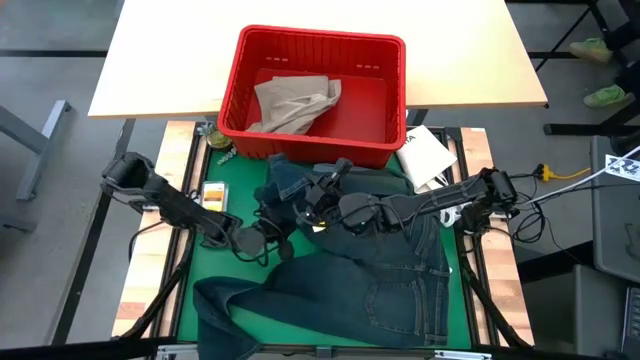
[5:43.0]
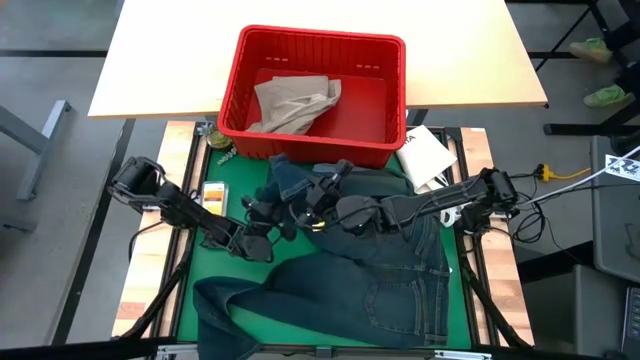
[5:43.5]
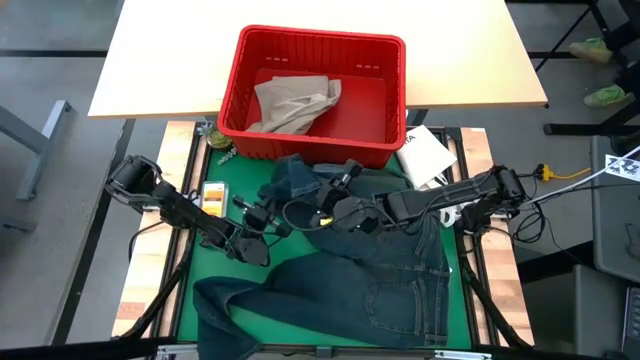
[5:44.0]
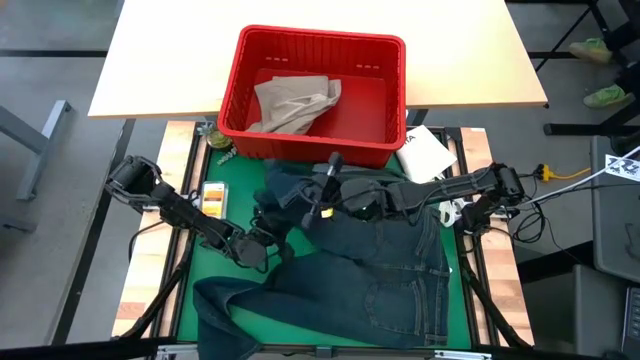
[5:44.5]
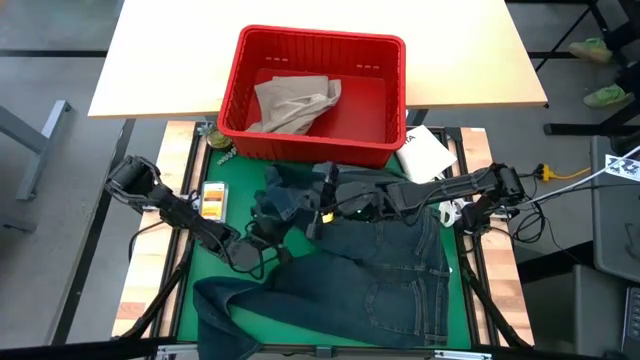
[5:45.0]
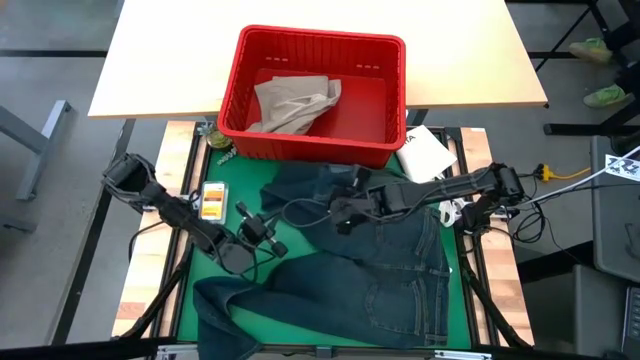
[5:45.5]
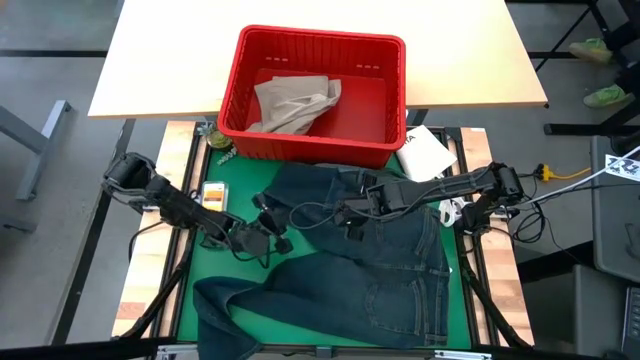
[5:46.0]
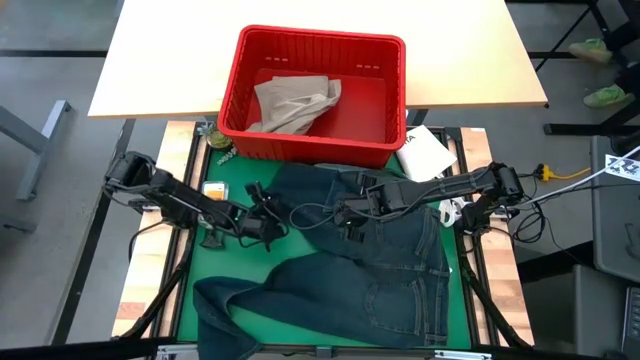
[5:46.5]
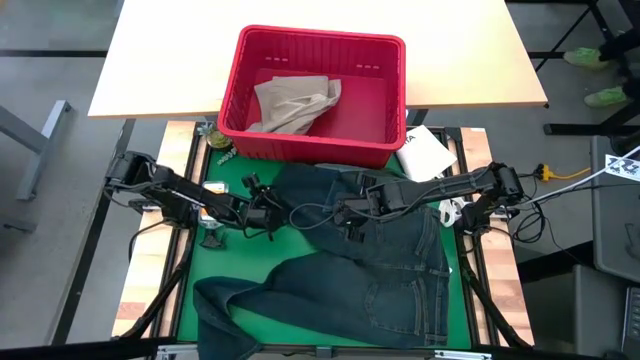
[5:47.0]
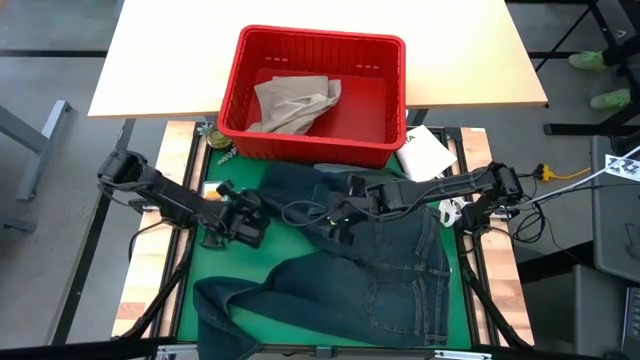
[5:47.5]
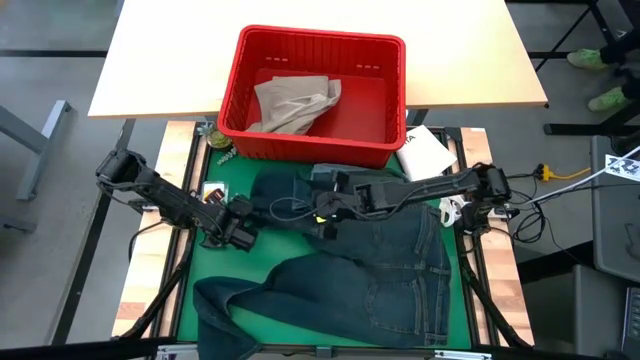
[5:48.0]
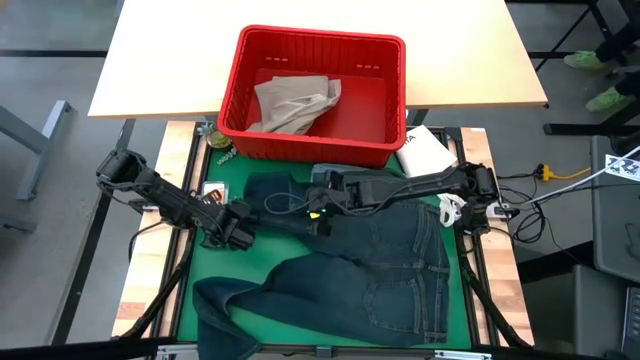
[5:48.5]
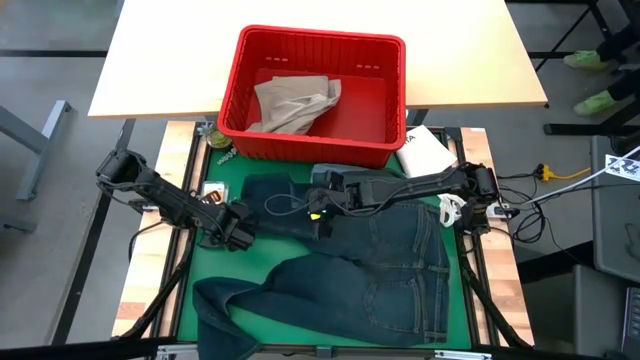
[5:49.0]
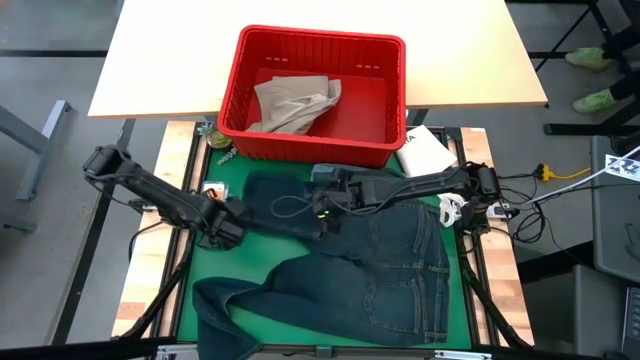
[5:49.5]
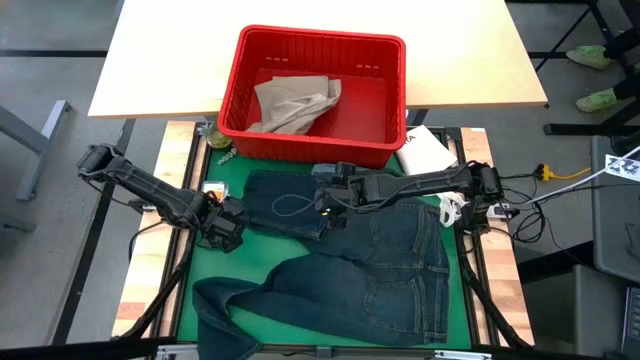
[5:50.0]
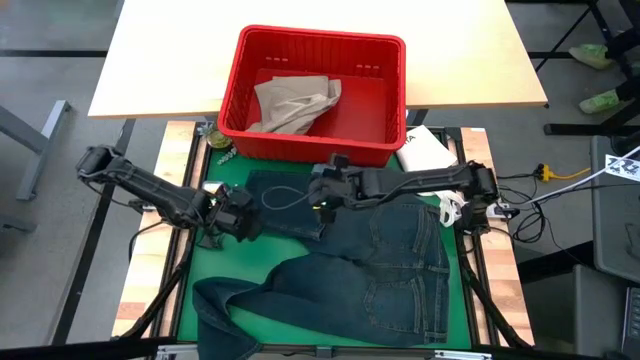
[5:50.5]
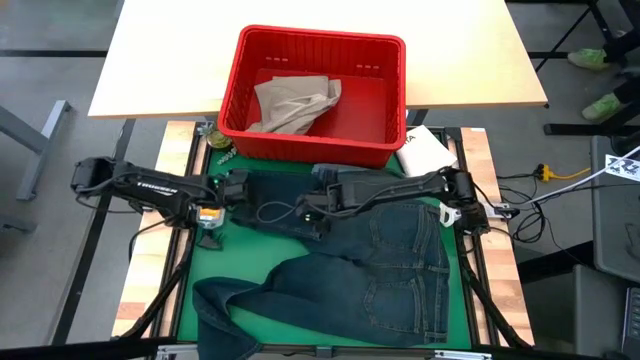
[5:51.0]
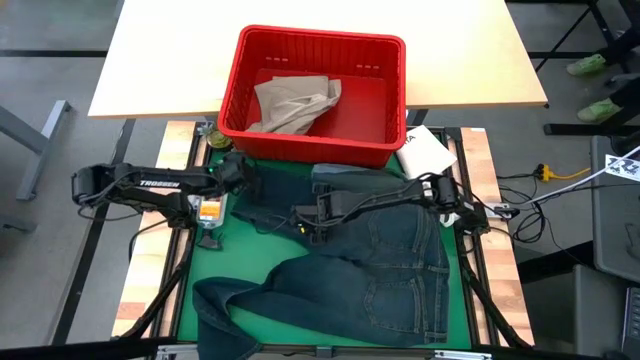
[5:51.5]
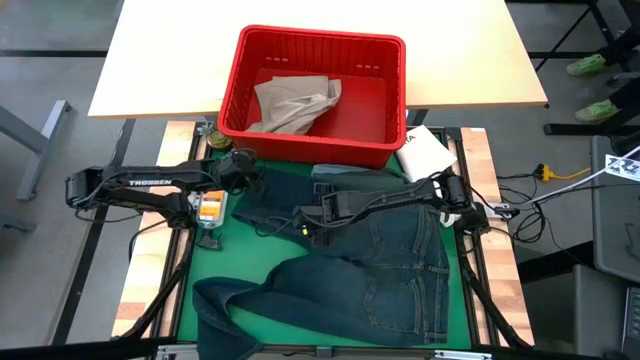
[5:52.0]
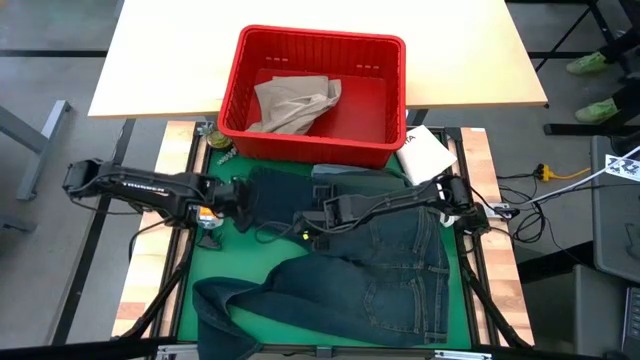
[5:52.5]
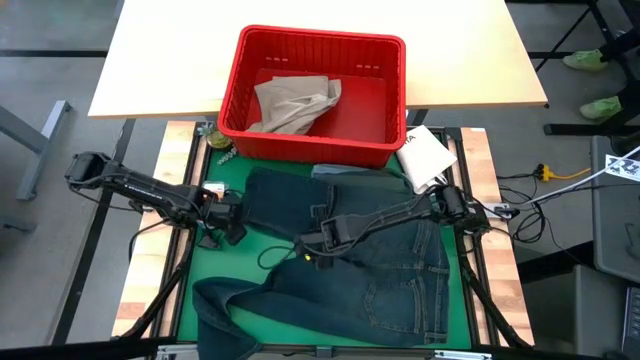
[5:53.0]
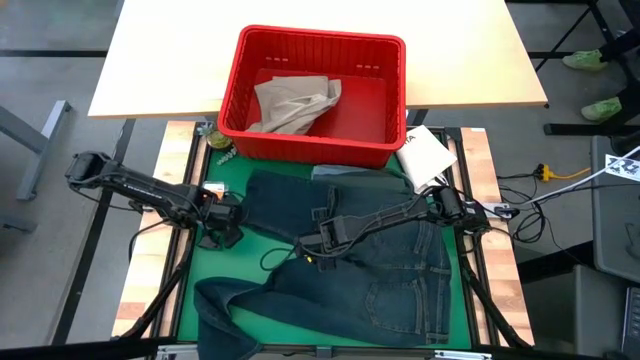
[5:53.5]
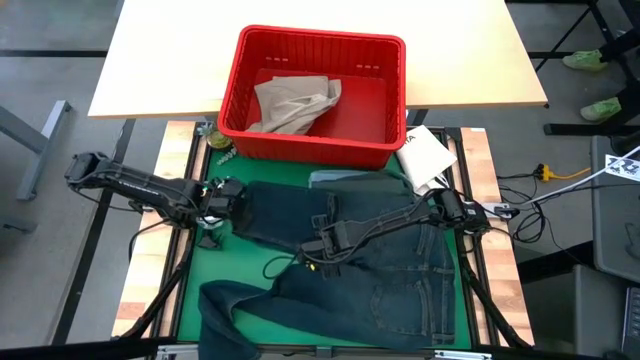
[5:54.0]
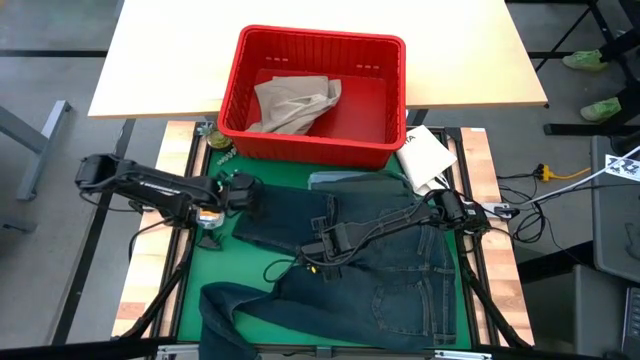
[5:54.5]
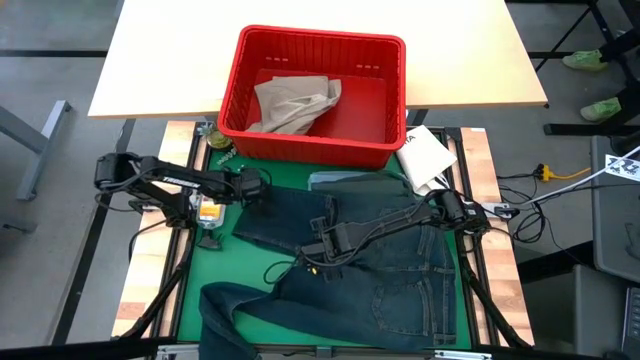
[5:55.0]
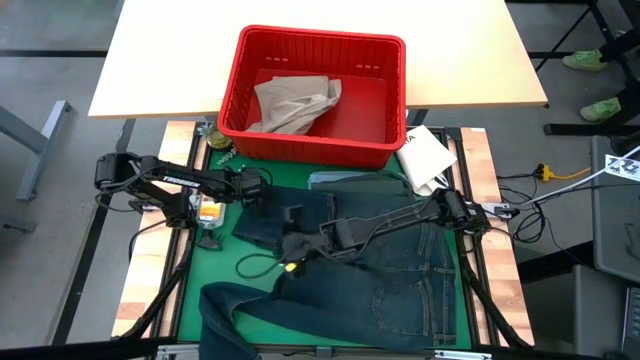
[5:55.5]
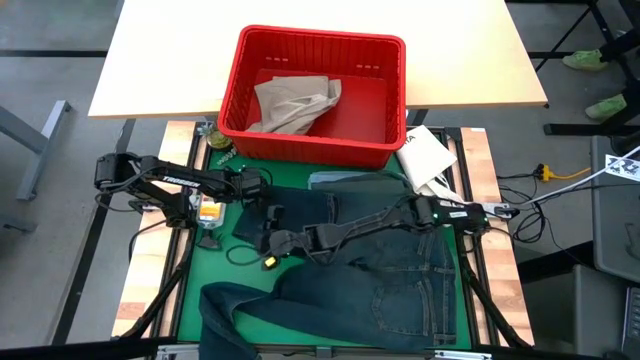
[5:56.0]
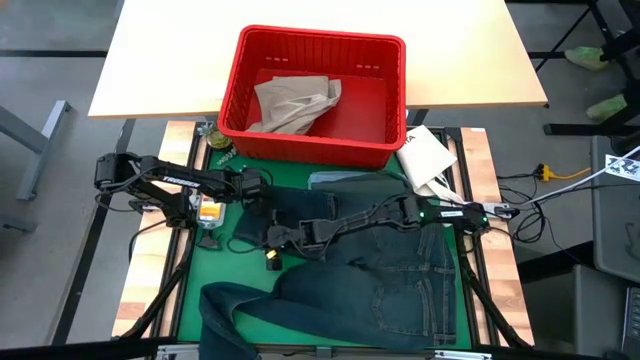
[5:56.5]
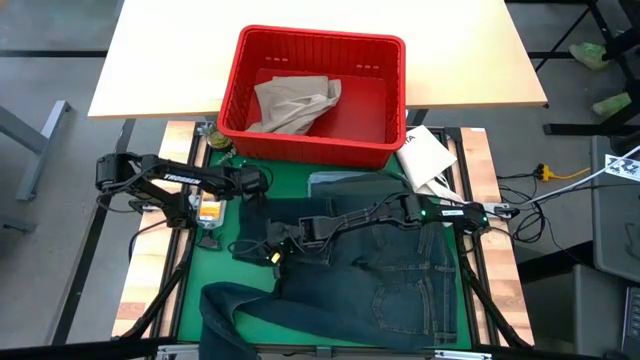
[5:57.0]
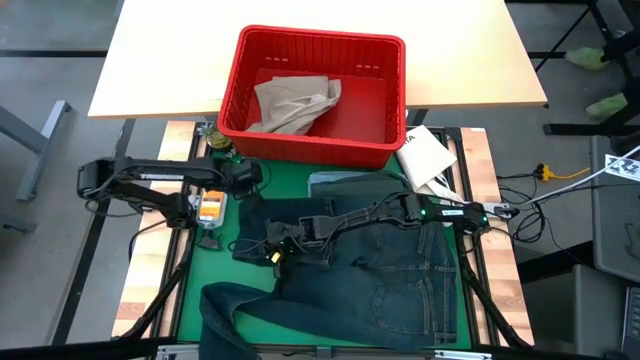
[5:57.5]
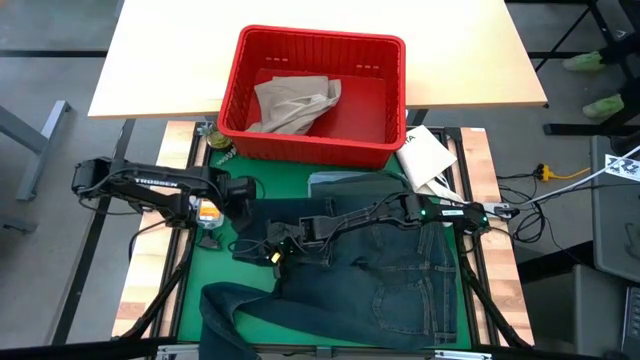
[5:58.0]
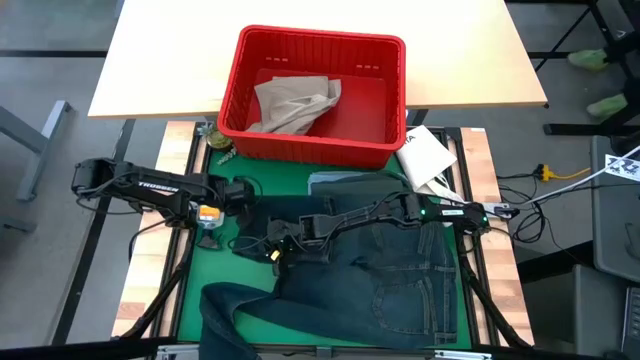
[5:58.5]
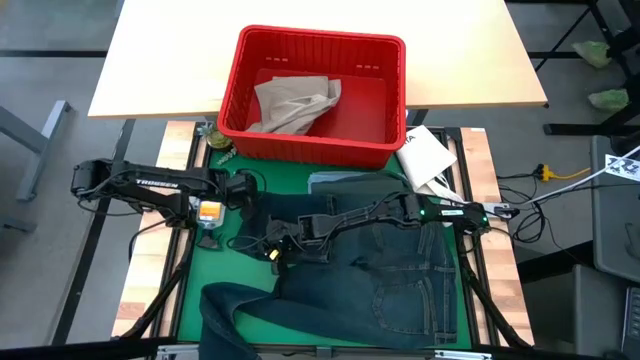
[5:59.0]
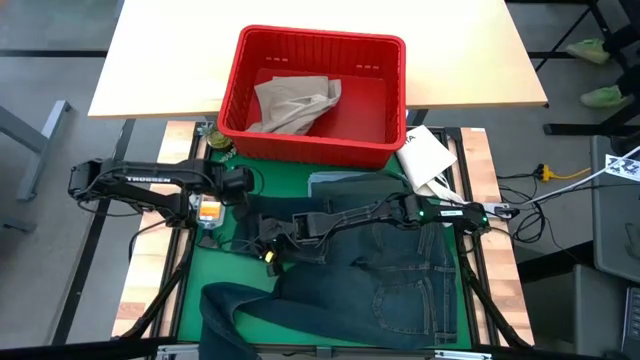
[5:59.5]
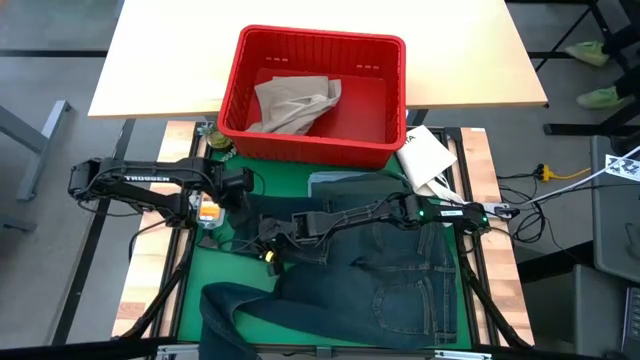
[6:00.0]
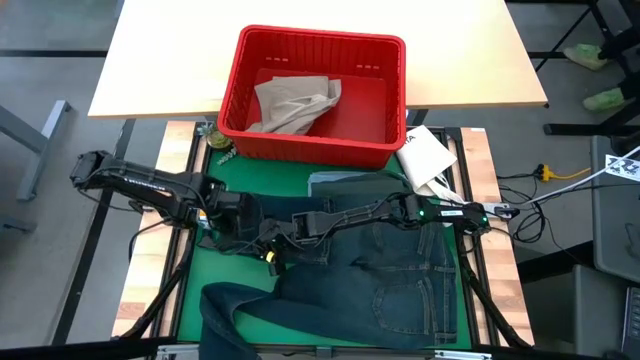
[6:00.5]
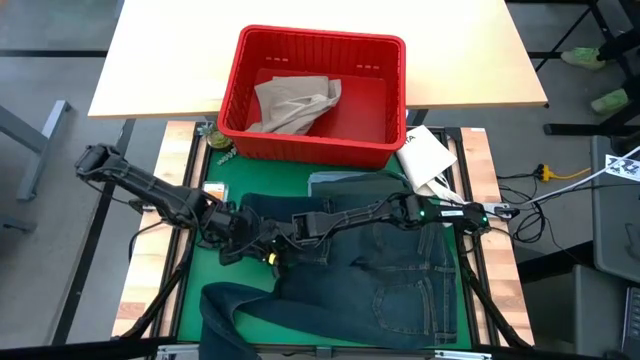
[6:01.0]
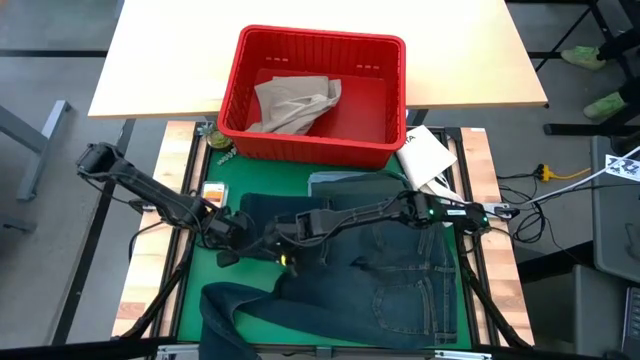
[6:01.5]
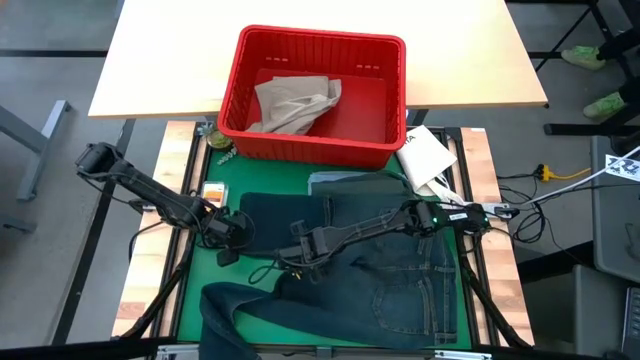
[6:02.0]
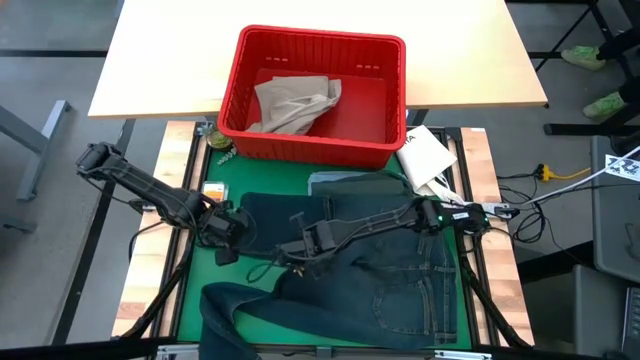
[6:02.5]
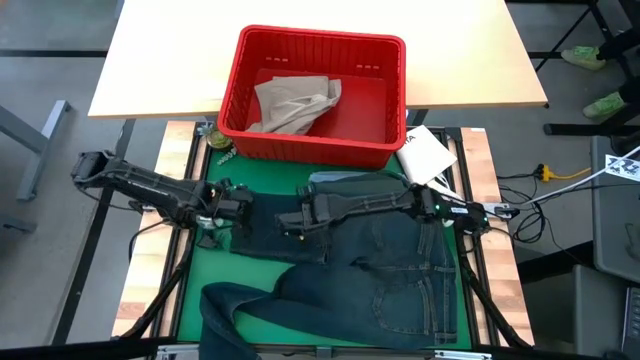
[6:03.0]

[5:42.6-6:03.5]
Task: Fold Laundry from Bin
Fold the dark blue pants
